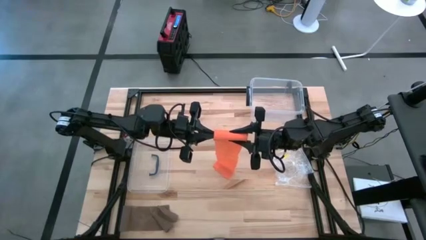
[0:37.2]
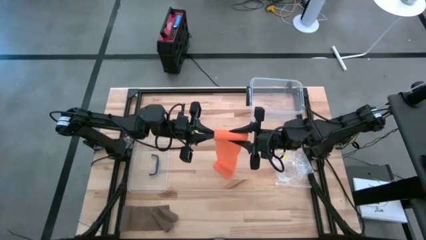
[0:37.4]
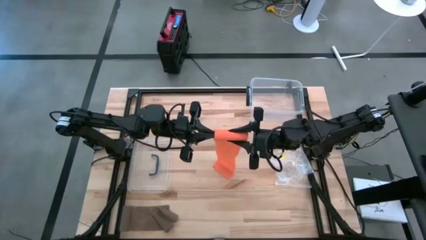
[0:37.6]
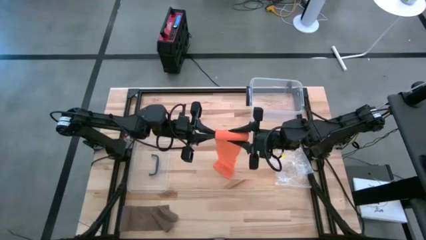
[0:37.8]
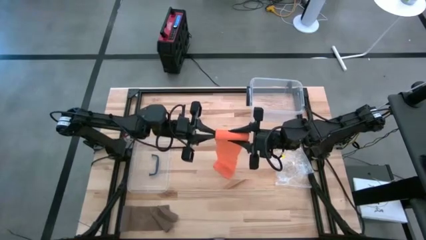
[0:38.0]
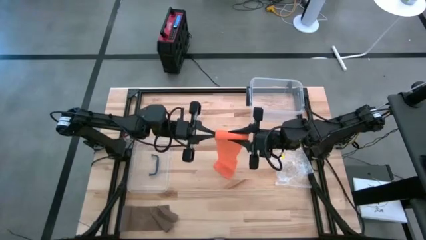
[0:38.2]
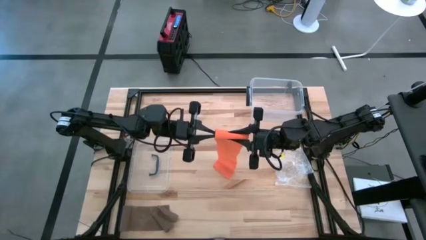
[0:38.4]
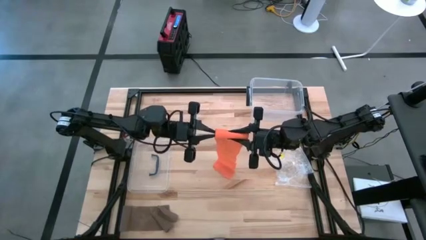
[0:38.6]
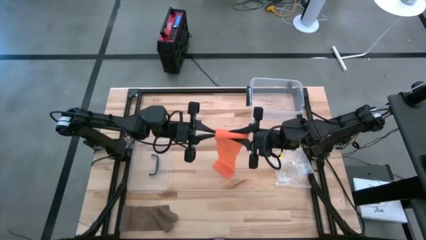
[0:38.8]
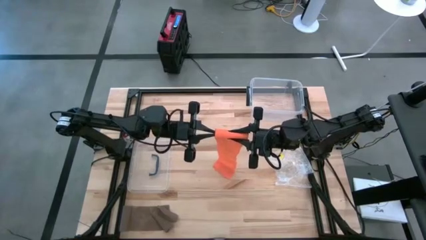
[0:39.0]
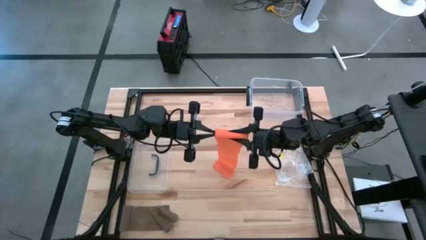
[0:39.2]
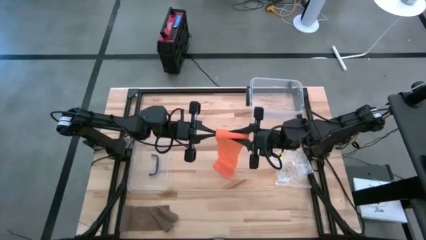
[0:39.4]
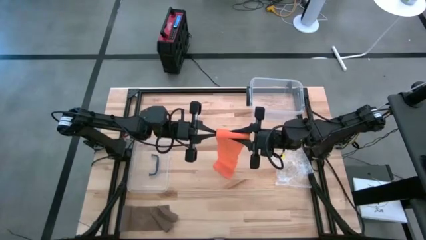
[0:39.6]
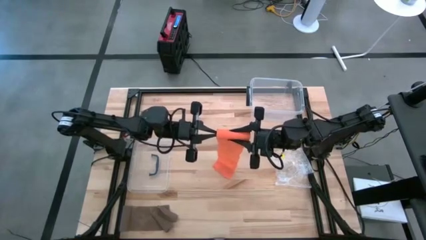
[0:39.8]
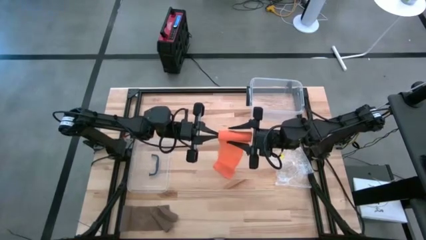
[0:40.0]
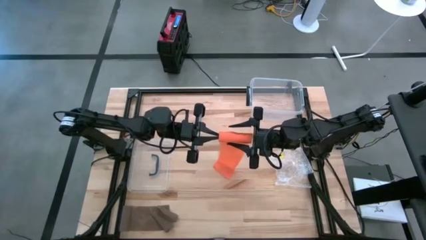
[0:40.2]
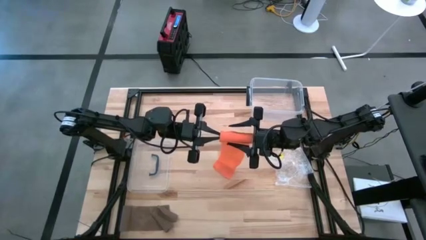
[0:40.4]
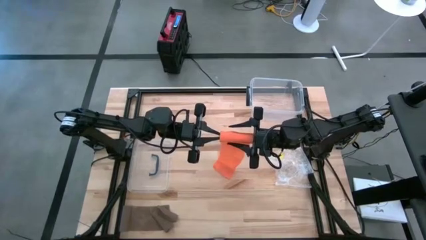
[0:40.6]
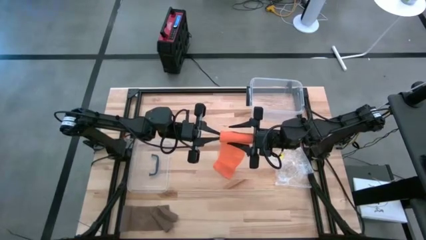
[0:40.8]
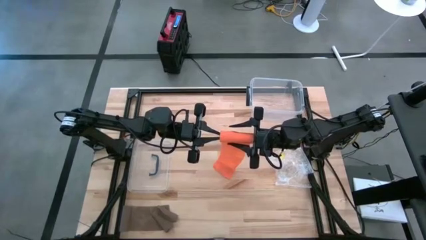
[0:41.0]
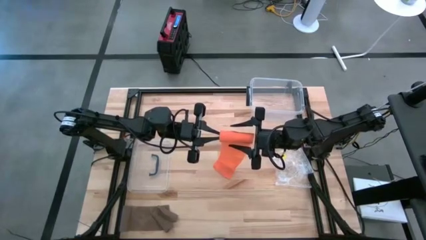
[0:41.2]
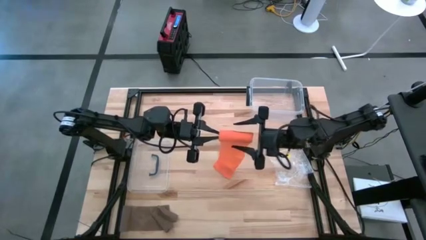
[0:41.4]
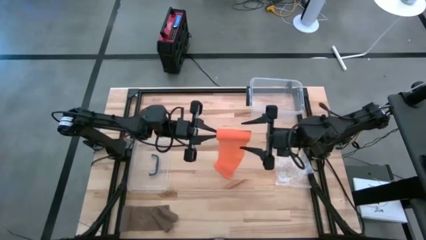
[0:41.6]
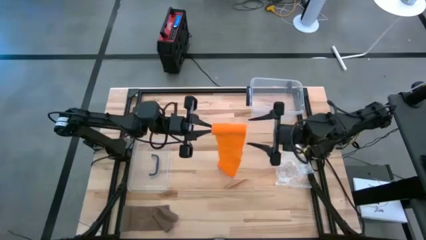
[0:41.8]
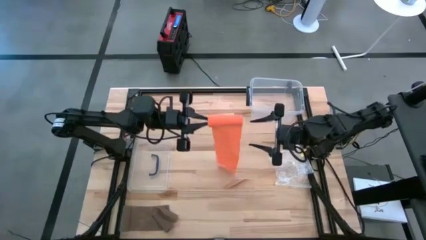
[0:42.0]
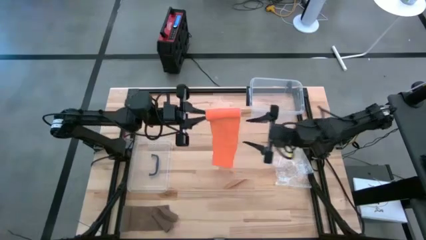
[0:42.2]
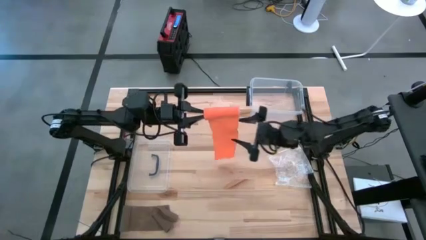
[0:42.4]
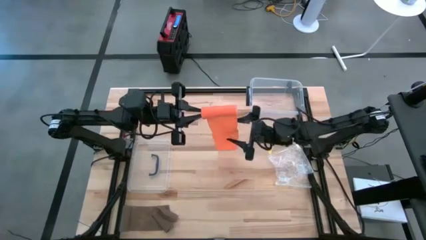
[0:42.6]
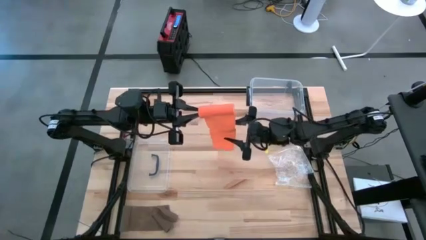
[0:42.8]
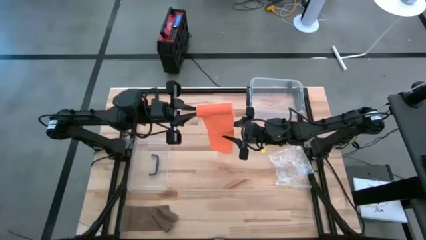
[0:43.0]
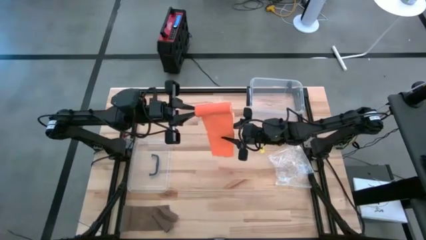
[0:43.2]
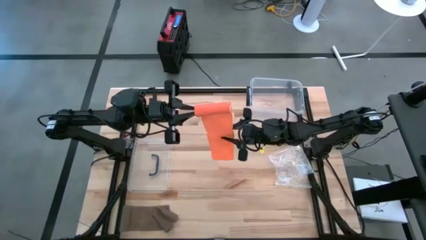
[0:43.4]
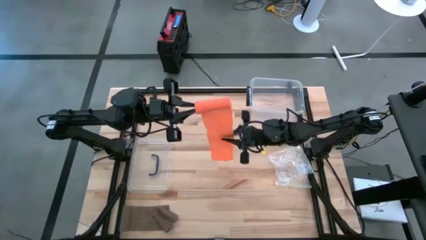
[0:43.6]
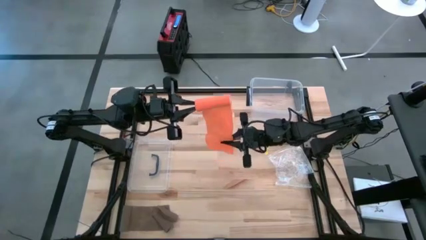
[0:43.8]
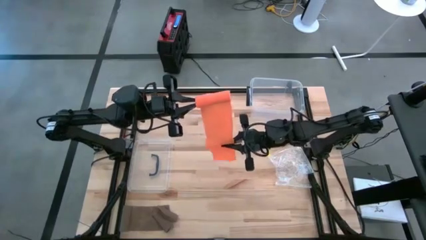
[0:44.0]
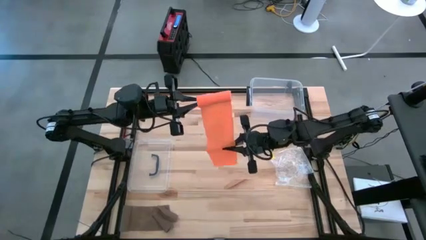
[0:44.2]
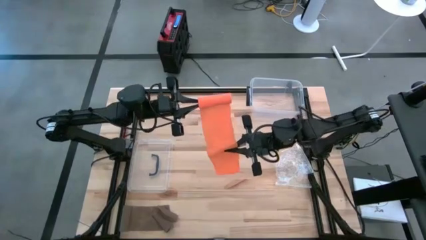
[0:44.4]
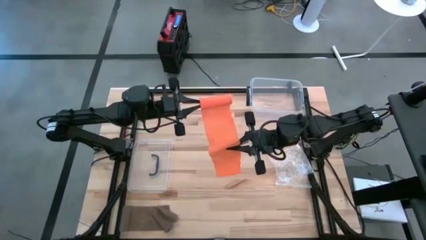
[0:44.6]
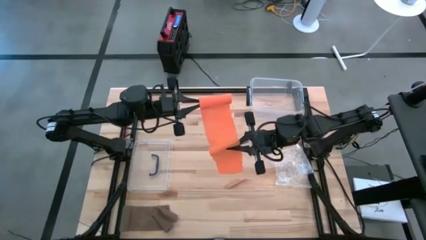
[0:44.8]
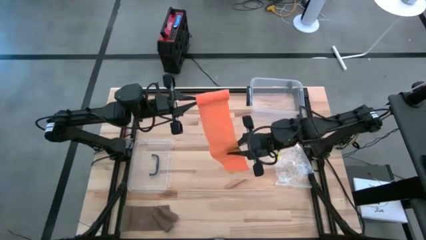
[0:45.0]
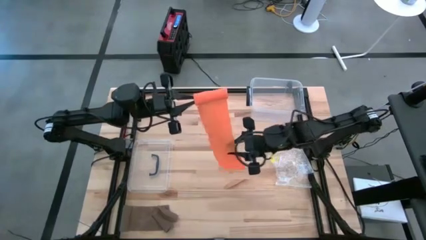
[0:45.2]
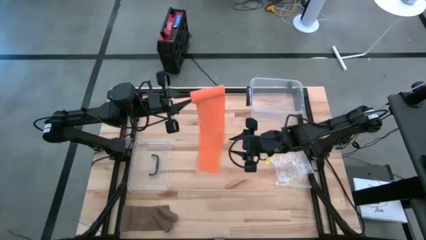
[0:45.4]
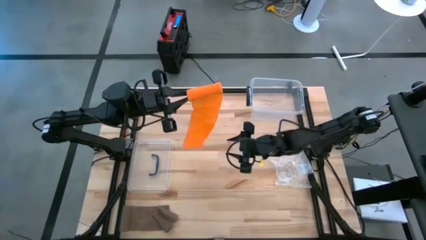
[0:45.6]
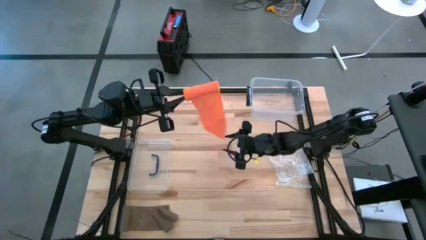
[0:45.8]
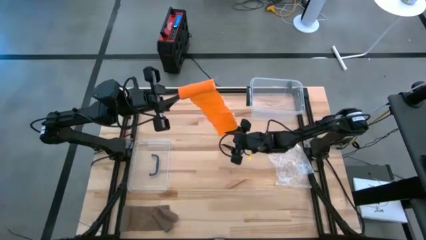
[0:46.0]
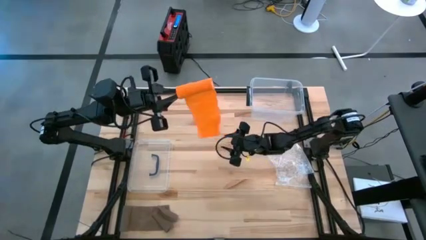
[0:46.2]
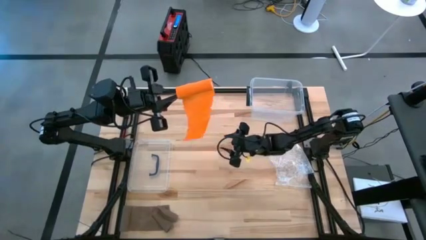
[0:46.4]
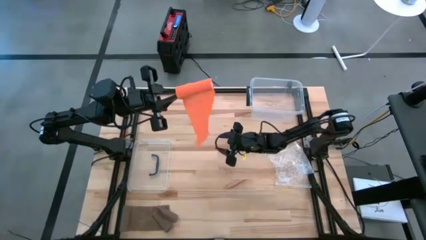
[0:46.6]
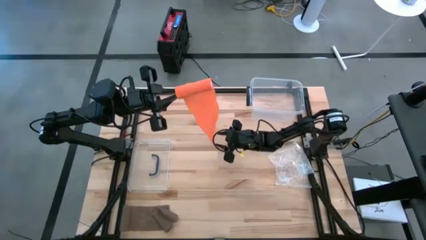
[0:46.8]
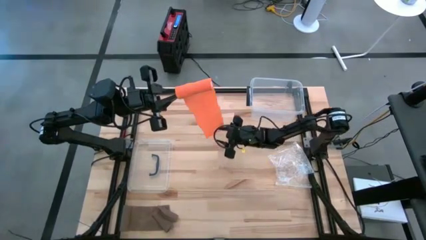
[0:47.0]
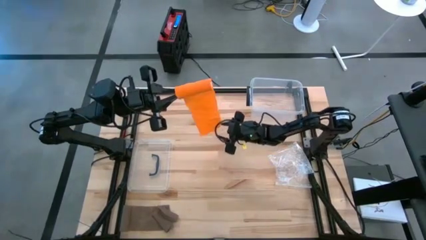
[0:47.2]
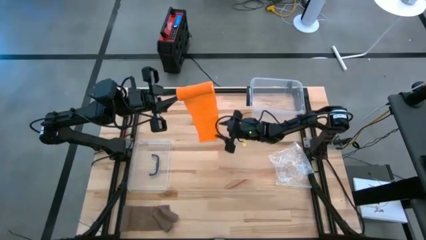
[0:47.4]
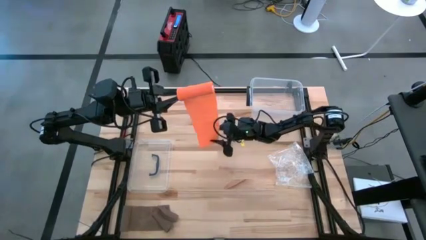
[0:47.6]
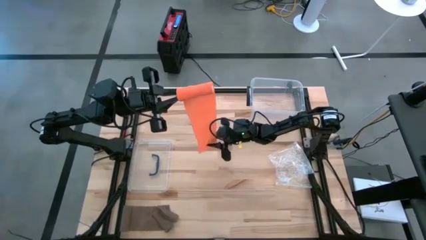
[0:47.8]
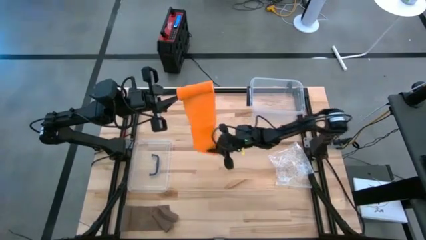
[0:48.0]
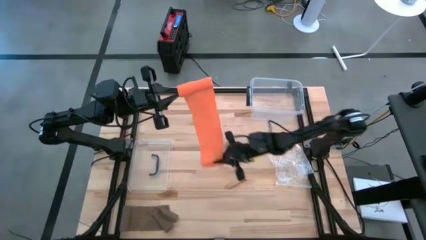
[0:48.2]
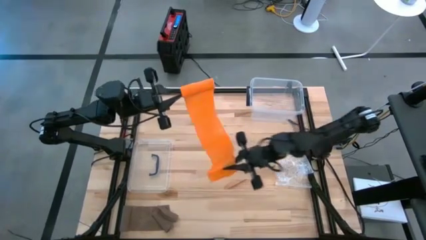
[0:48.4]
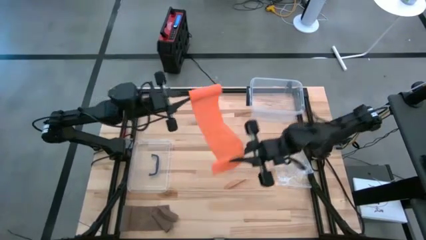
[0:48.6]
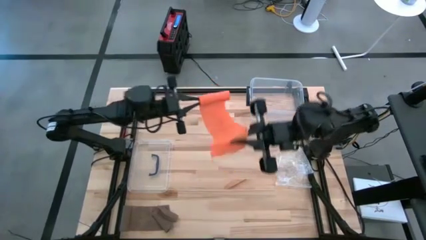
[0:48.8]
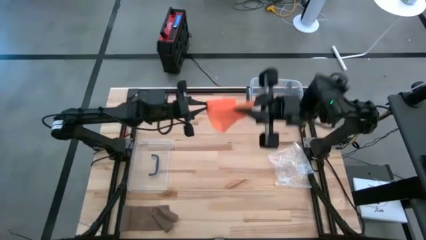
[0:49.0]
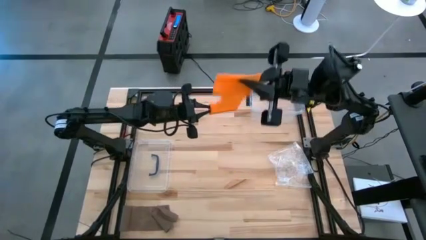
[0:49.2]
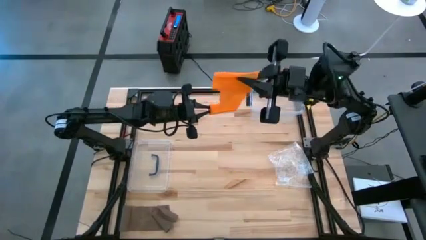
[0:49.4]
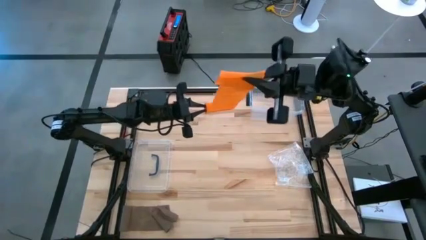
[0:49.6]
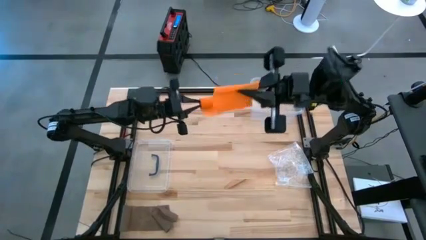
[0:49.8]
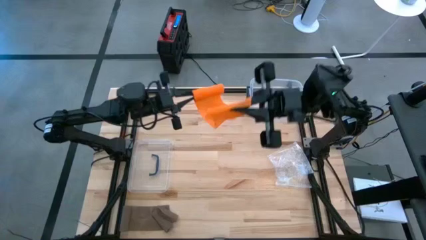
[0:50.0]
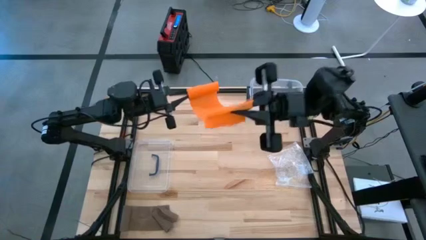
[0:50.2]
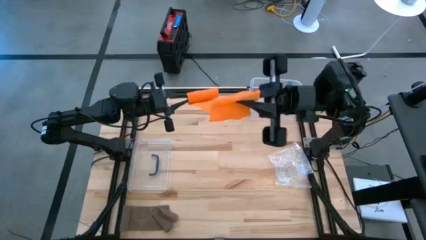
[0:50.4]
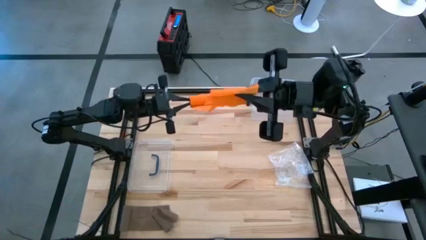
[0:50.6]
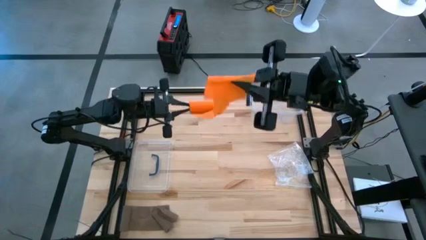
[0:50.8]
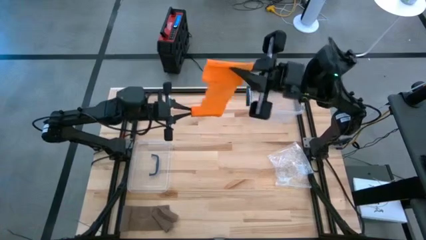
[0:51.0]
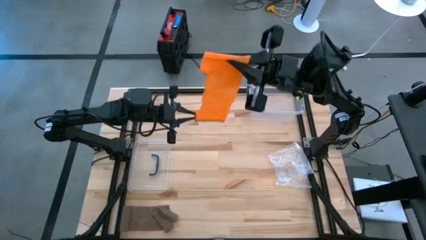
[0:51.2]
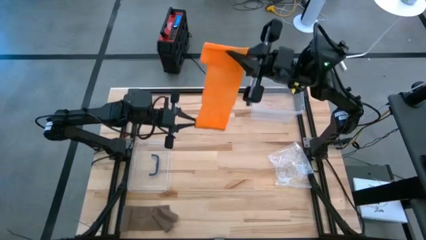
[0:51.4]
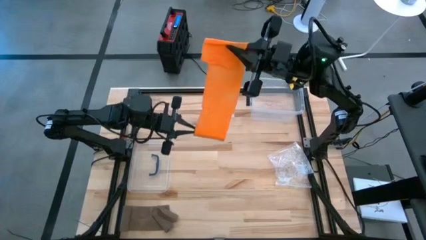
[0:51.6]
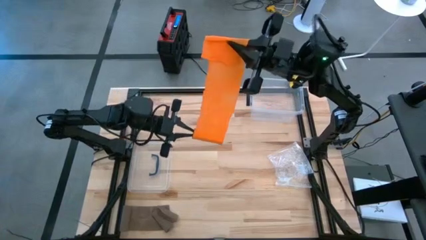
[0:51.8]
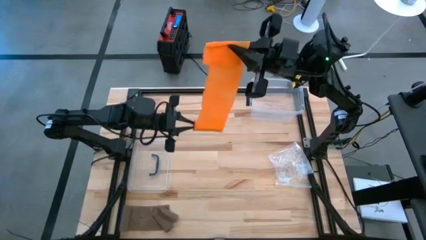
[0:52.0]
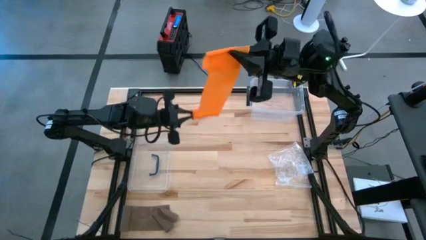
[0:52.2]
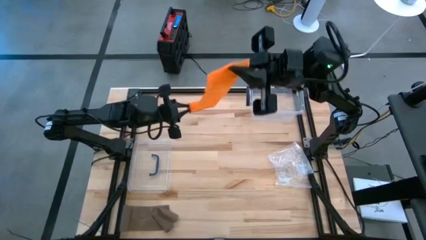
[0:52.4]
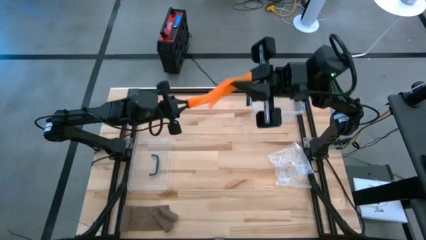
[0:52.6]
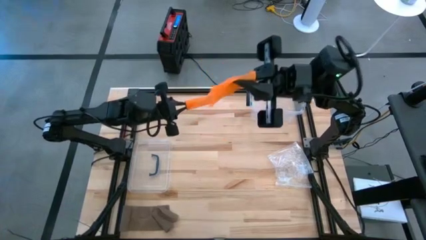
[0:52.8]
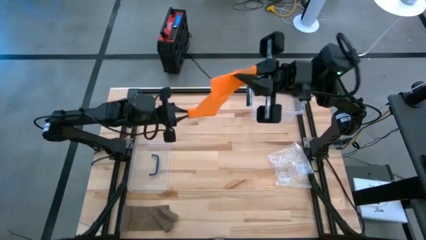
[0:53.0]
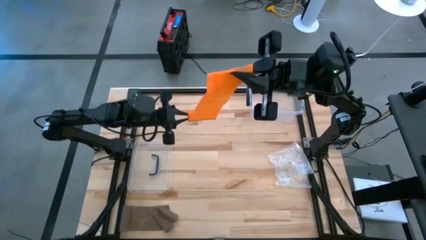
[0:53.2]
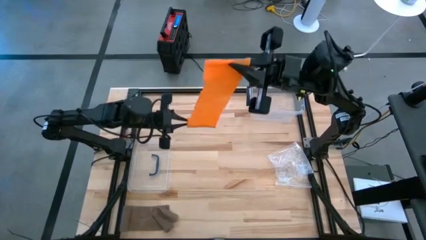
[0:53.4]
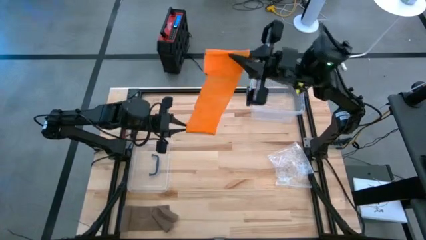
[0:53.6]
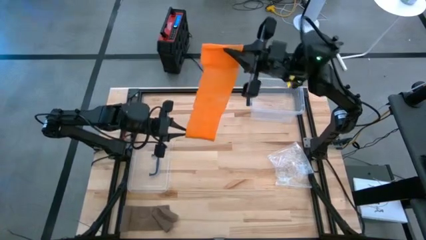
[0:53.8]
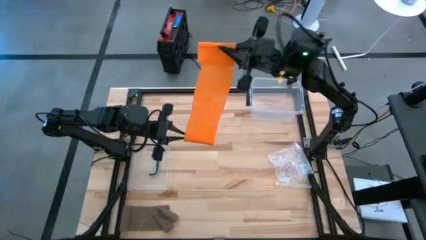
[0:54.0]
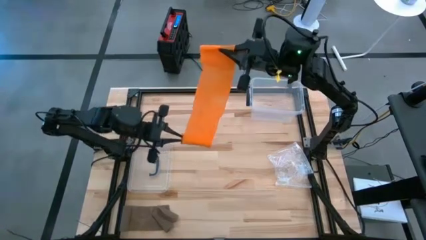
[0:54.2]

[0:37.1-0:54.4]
Task: Roll bandage
Roll the orange bandage
